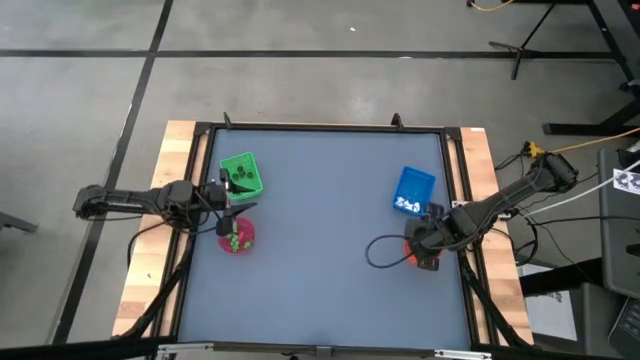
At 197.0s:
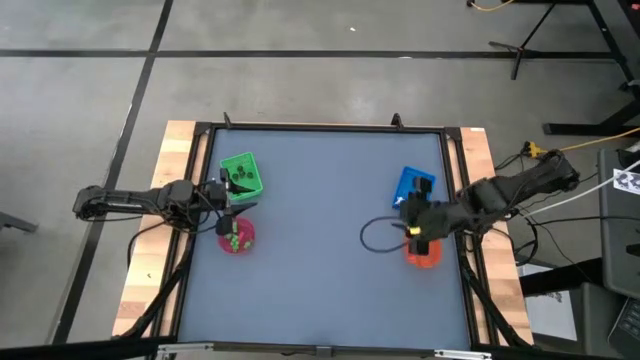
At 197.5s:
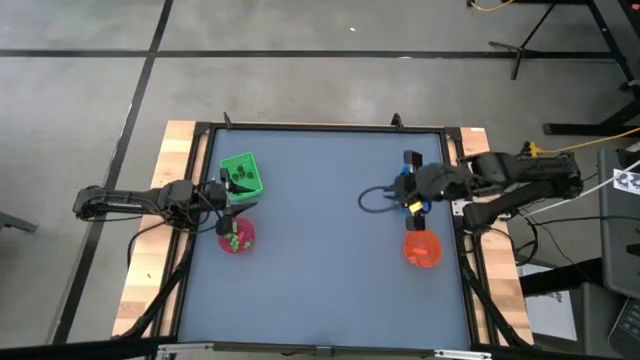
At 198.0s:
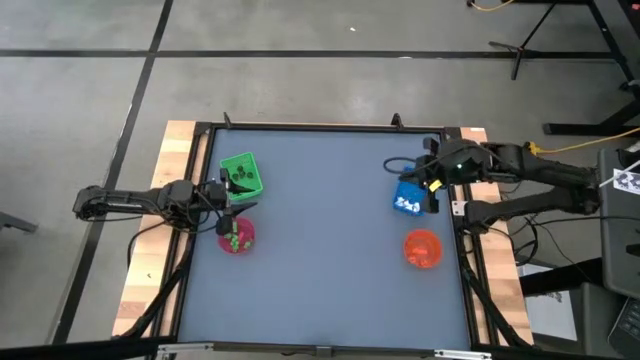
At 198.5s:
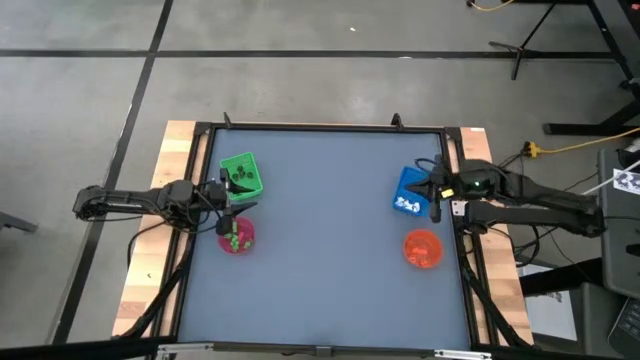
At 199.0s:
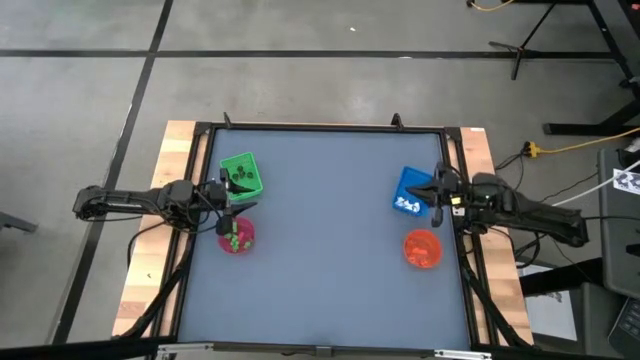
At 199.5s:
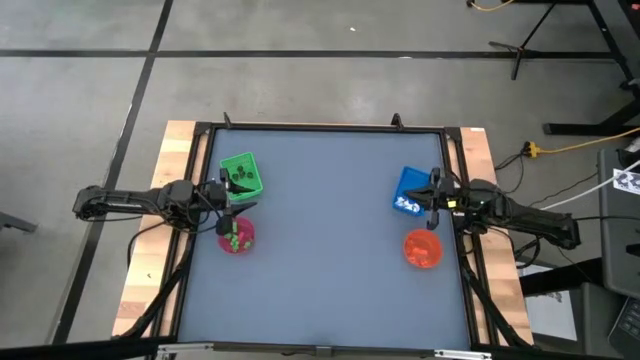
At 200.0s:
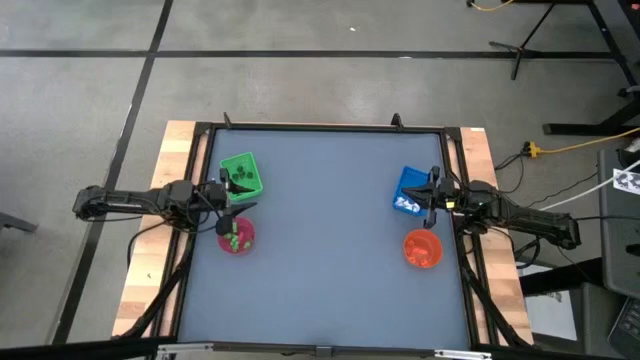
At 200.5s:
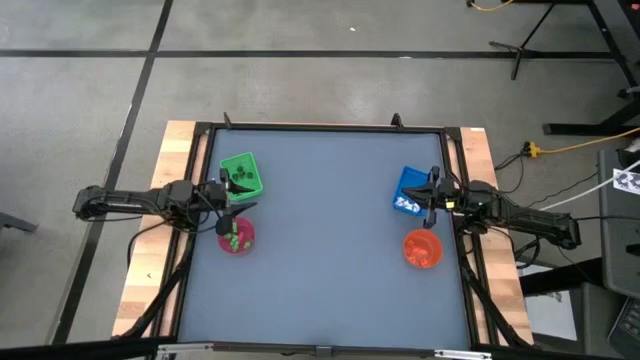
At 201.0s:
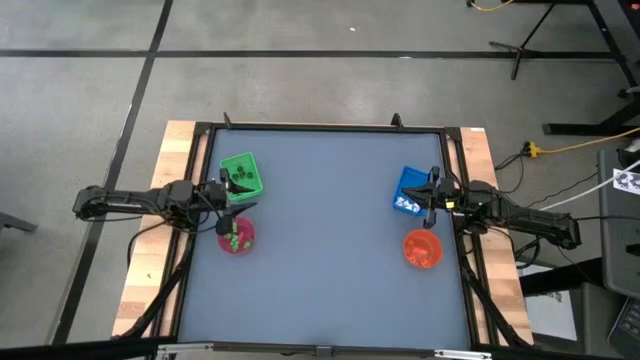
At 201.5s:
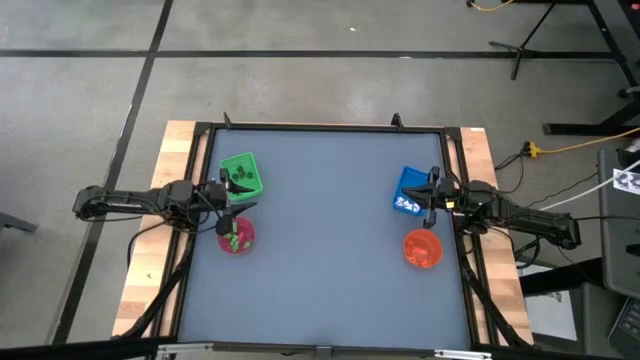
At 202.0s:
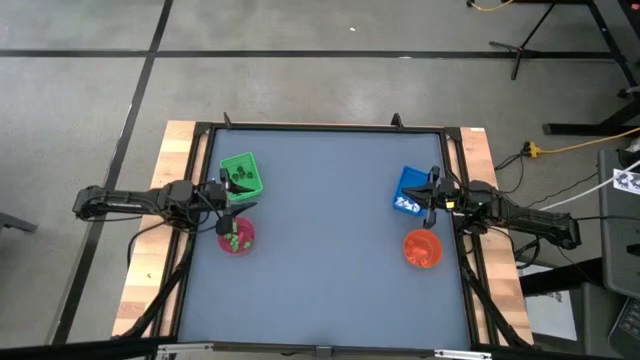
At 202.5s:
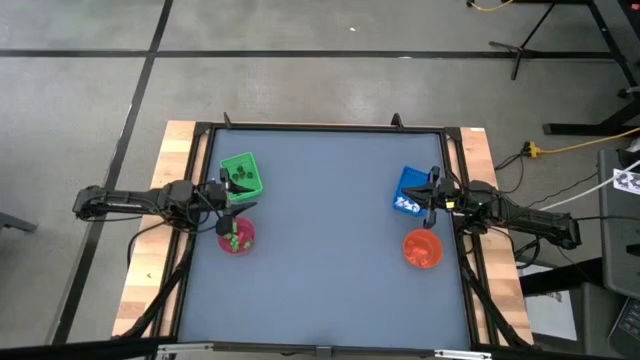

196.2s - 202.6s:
Task: Sort Halloween decoration
Return to Home Position

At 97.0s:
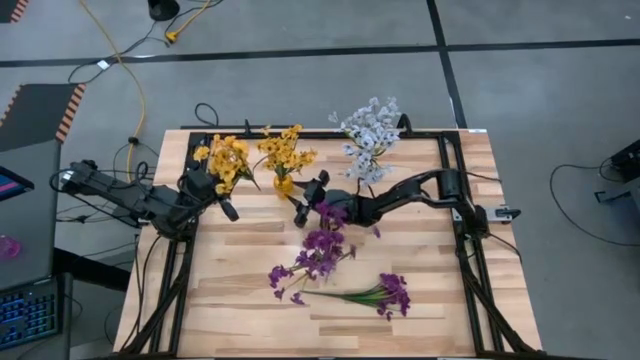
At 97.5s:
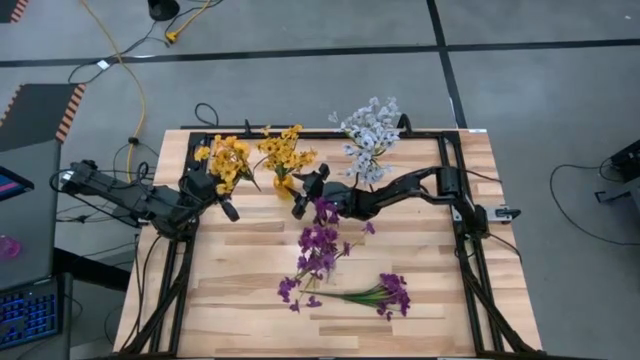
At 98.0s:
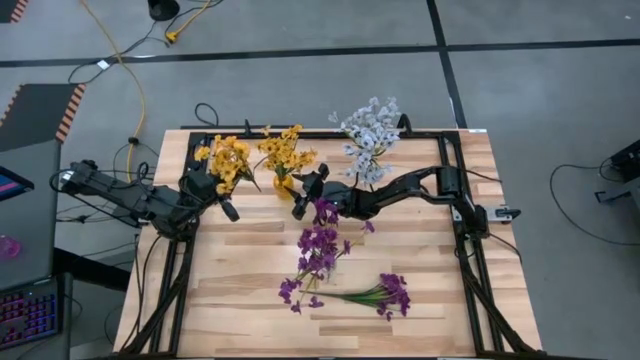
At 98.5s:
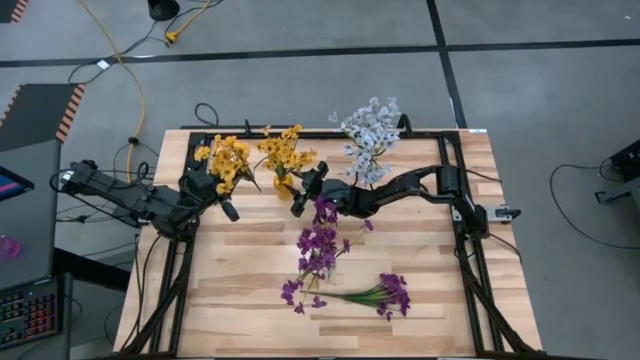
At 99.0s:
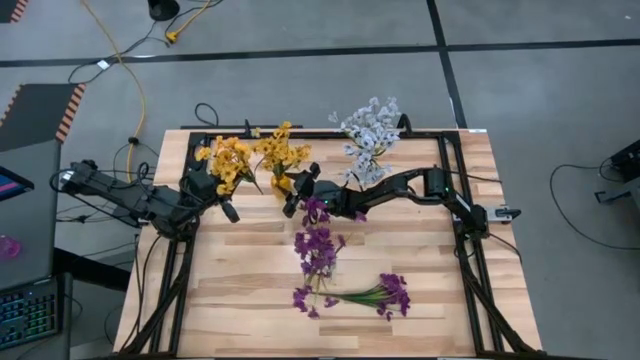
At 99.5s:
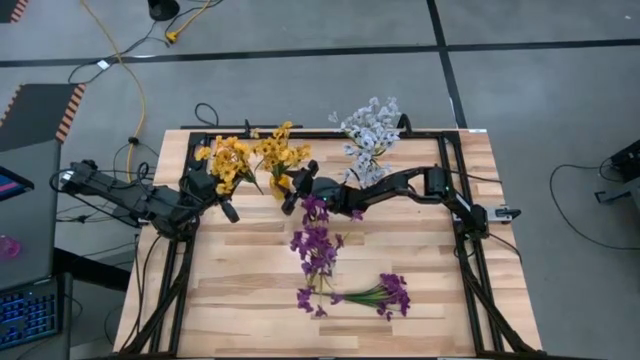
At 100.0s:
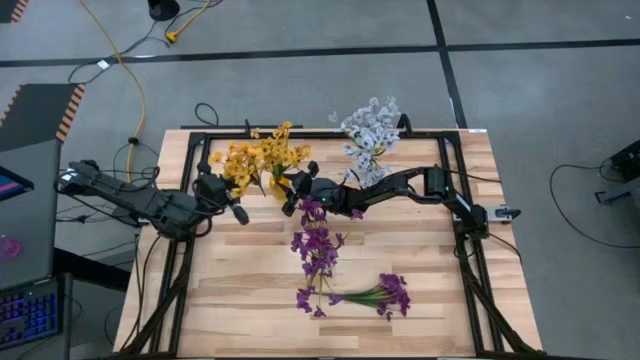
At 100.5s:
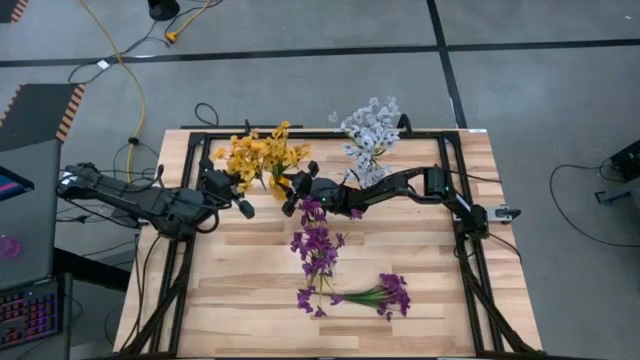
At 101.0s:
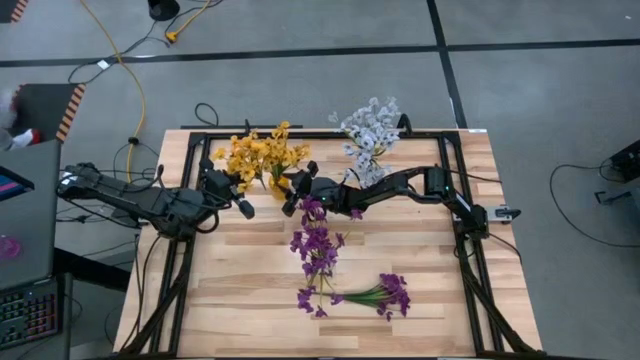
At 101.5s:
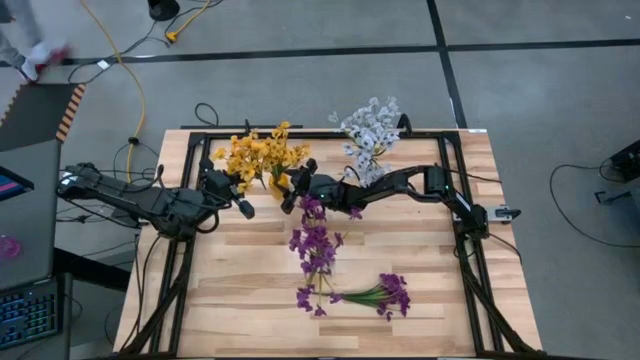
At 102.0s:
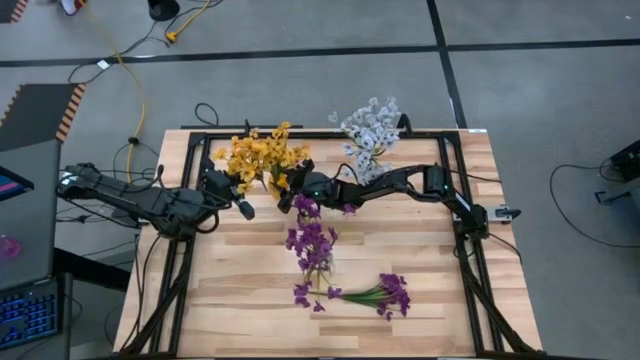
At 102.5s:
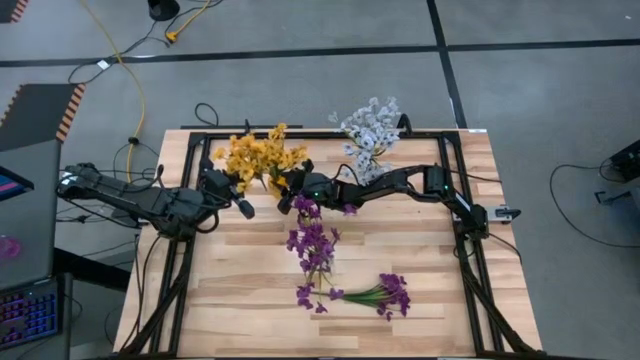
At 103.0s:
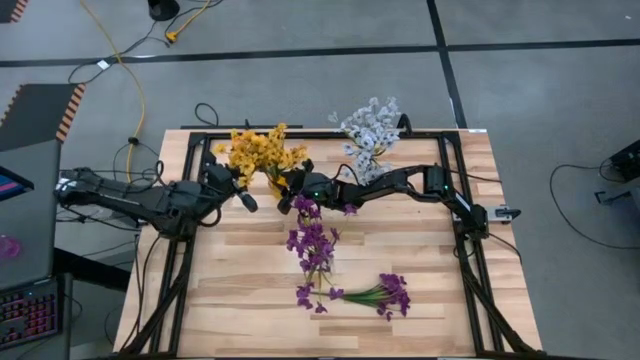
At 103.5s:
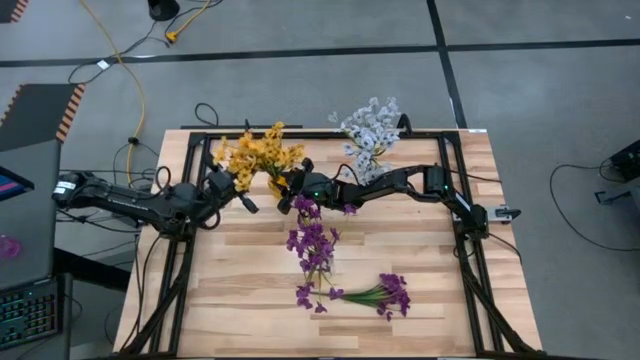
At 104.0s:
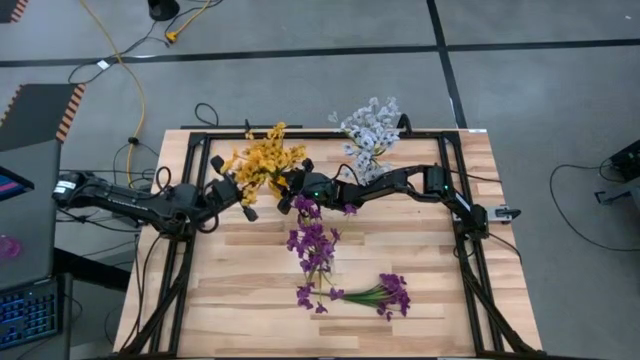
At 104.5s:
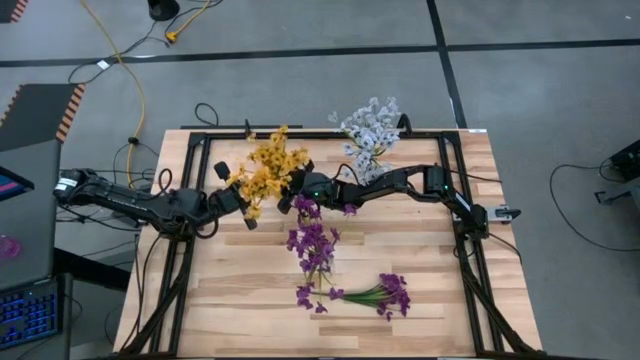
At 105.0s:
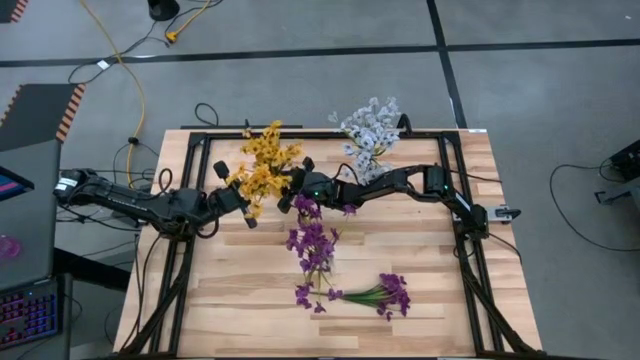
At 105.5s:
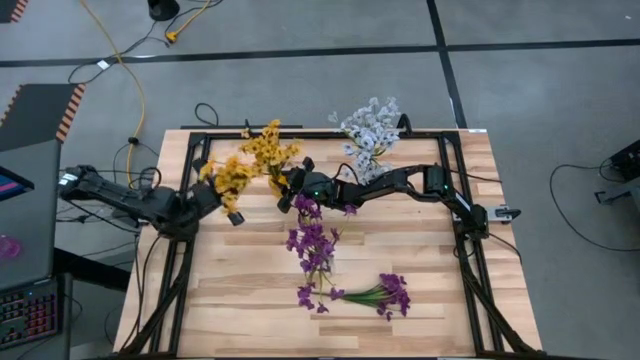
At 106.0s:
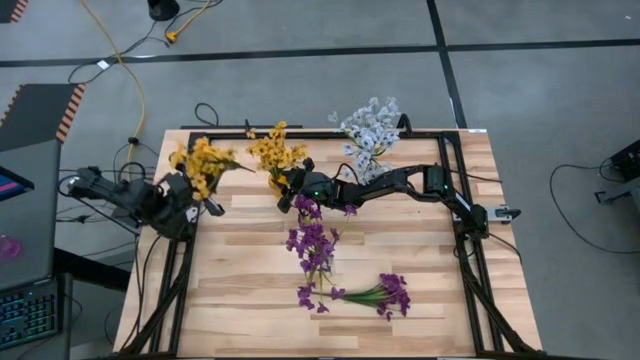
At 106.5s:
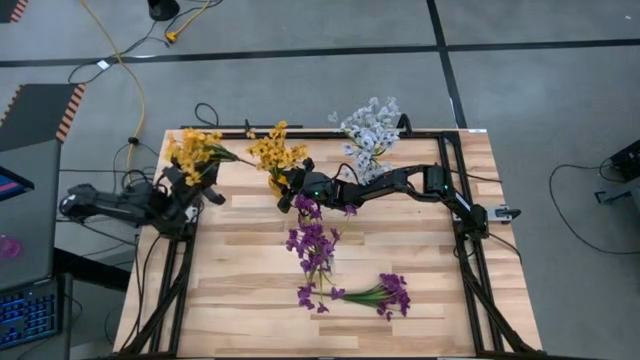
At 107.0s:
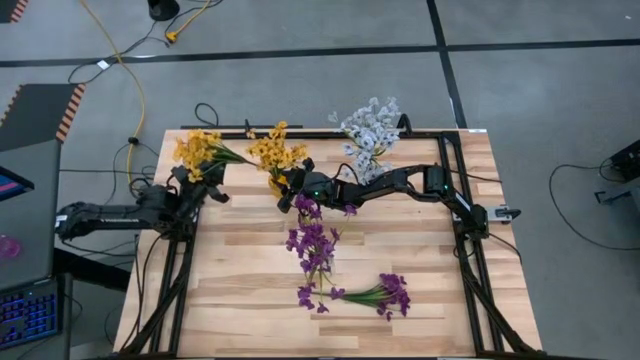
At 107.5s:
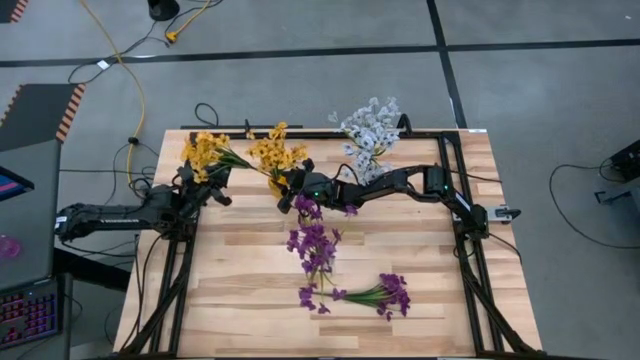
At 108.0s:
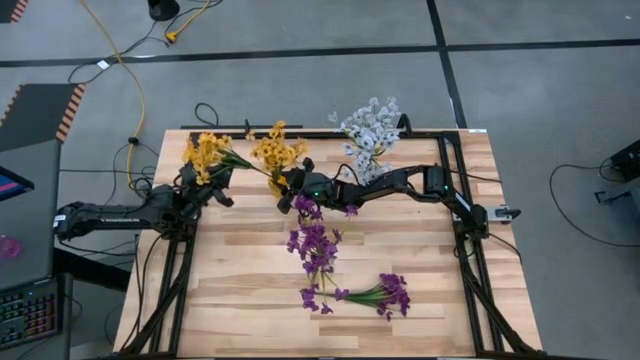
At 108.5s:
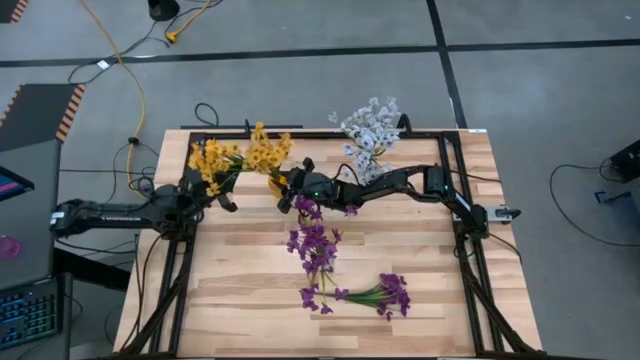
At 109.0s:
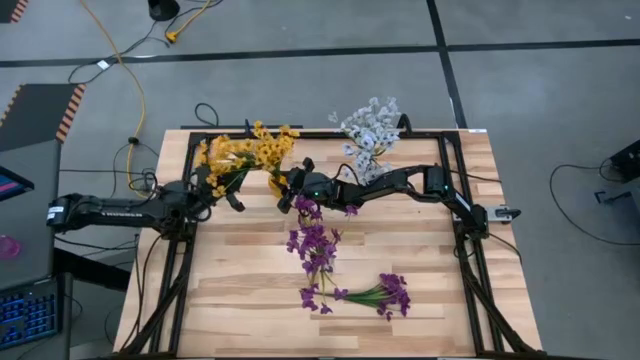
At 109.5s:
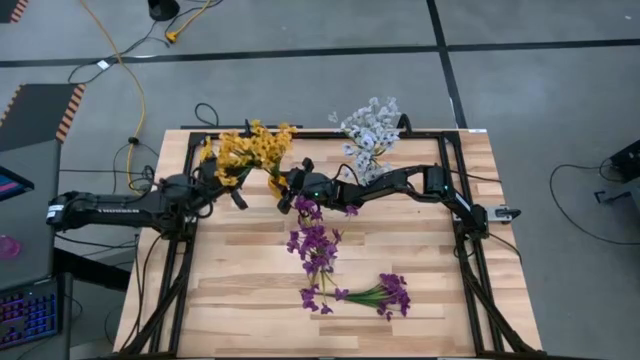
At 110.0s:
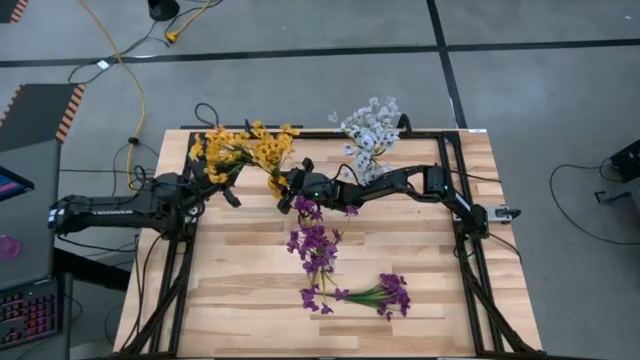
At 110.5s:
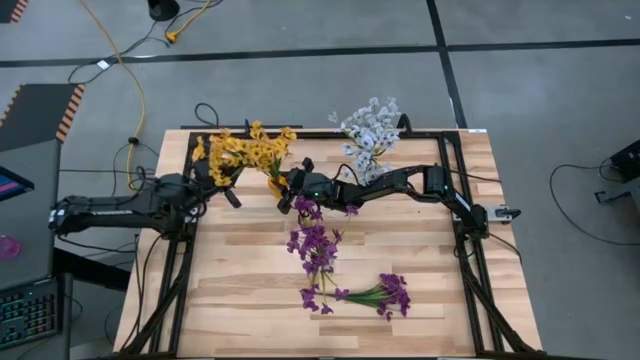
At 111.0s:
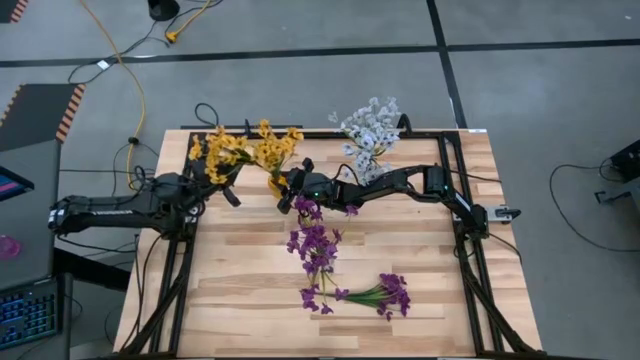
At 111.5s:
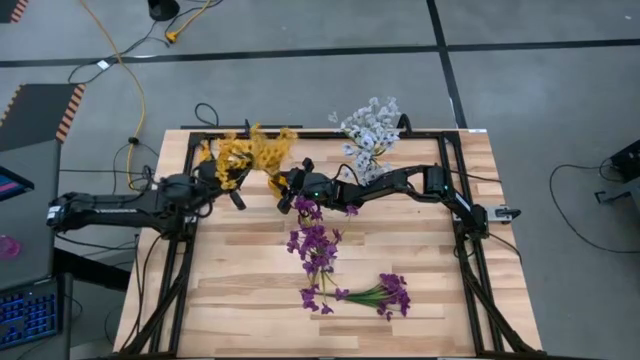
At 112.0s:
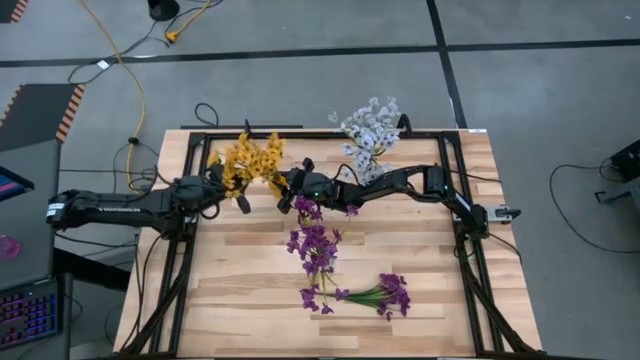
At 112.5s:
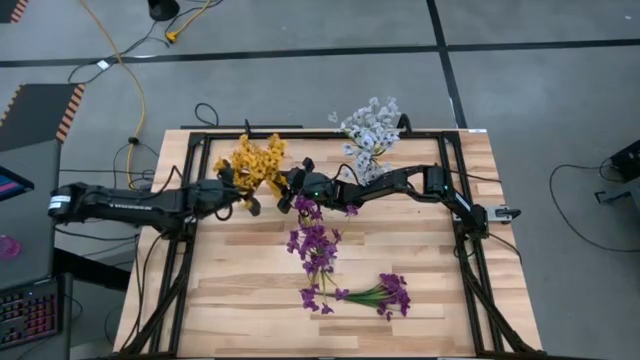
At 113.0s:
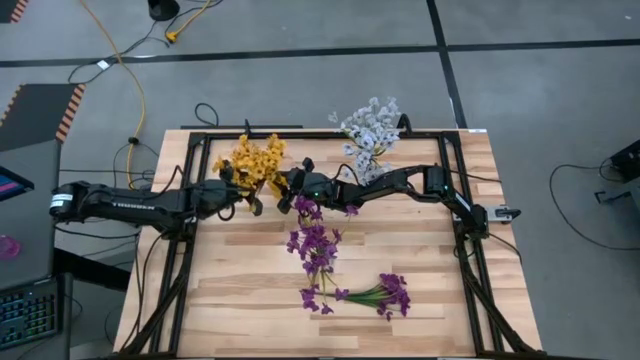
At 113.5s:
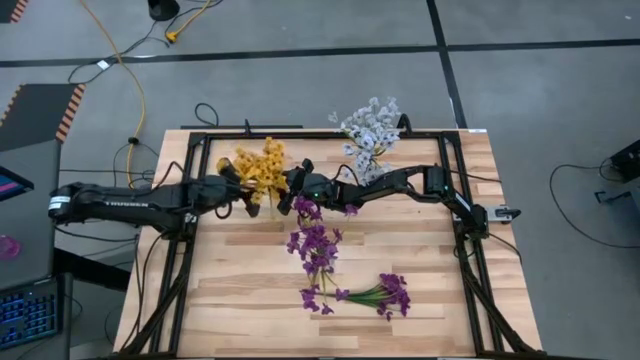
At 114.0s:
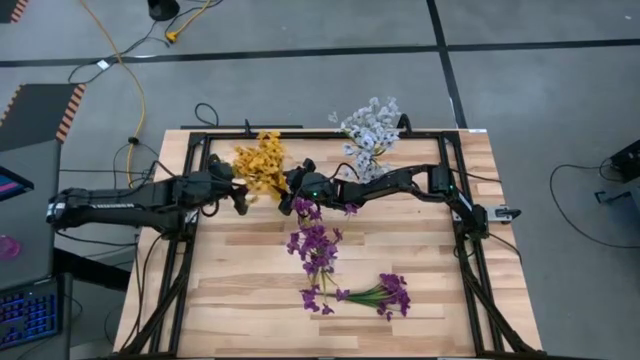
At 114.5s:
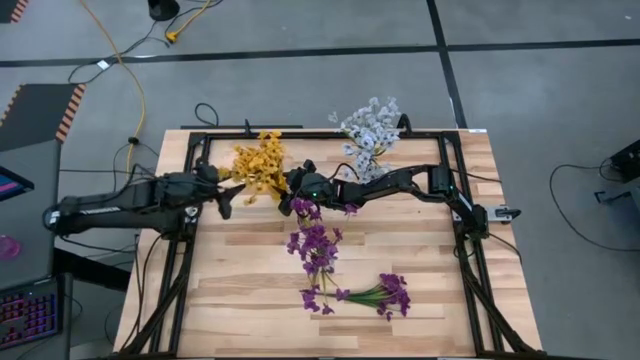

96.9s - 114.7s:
Task: Sort flowers into vase by color
Put the yellow flowers into the yellow vase
